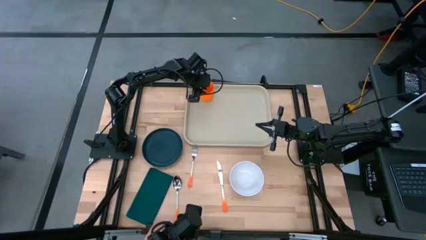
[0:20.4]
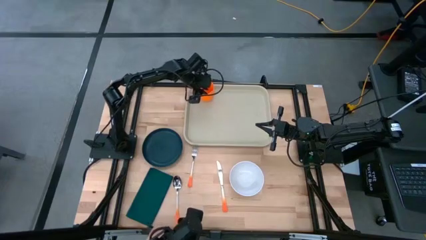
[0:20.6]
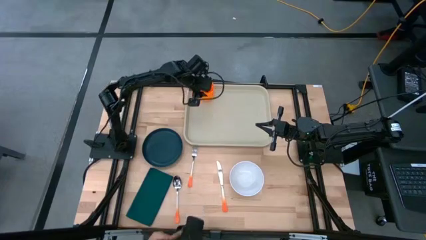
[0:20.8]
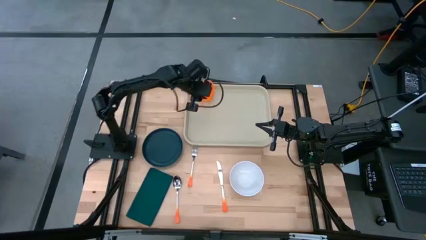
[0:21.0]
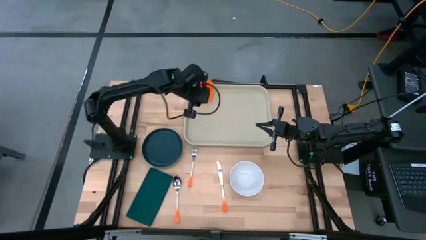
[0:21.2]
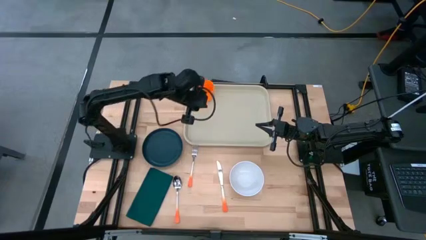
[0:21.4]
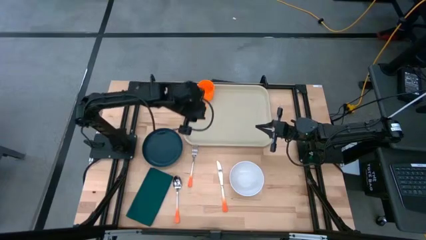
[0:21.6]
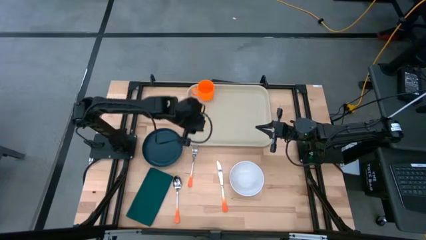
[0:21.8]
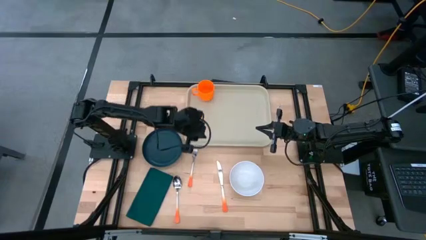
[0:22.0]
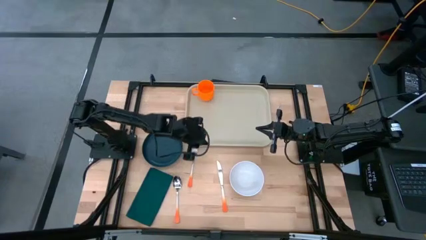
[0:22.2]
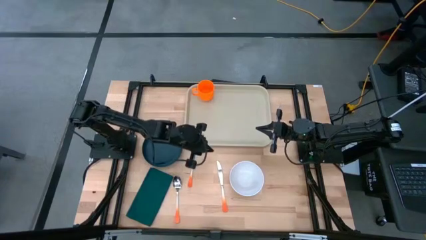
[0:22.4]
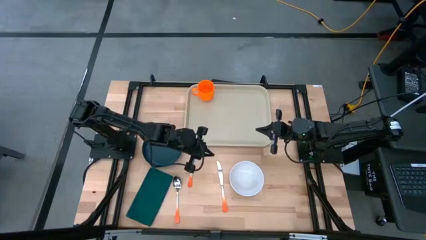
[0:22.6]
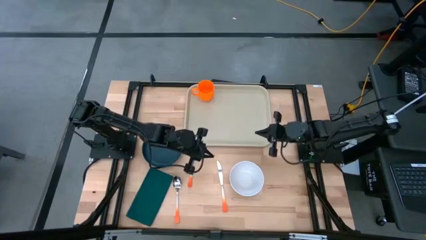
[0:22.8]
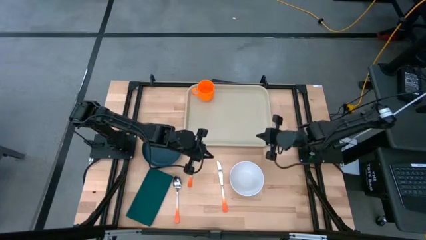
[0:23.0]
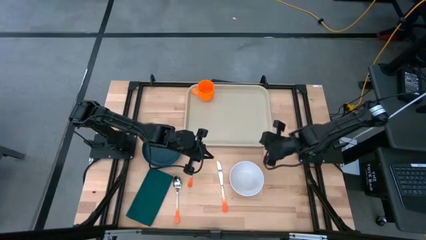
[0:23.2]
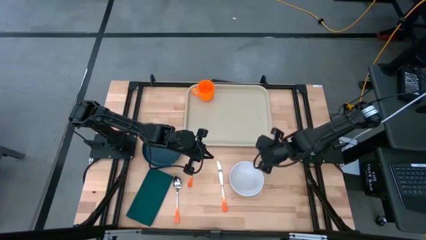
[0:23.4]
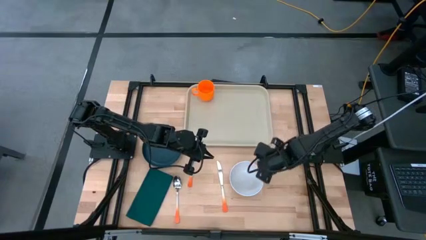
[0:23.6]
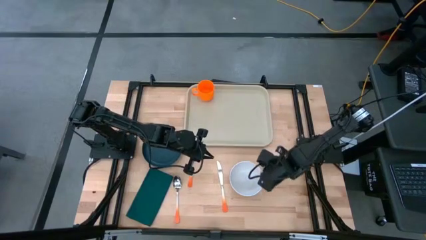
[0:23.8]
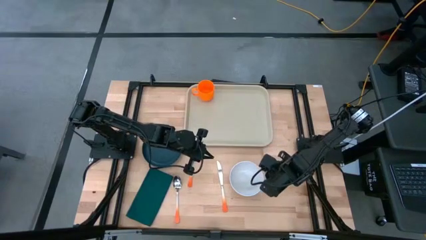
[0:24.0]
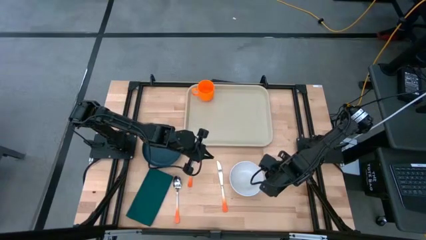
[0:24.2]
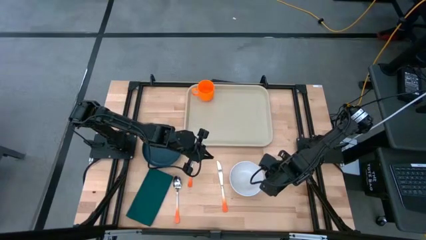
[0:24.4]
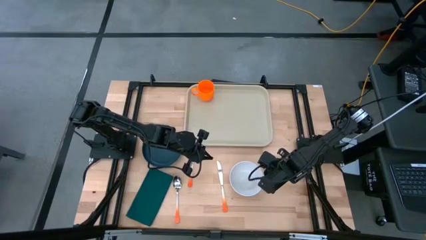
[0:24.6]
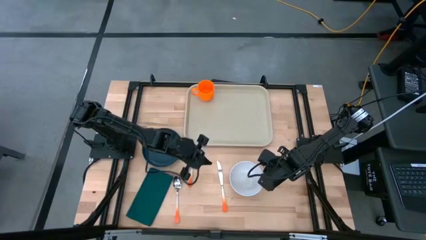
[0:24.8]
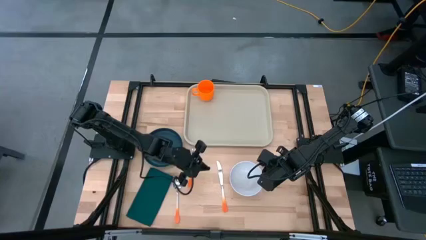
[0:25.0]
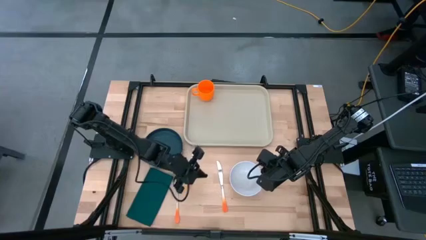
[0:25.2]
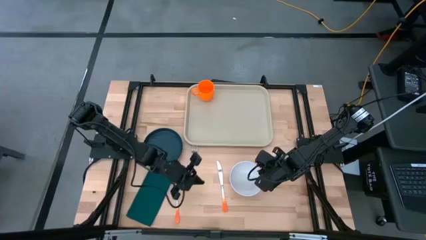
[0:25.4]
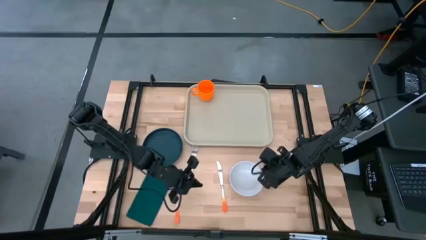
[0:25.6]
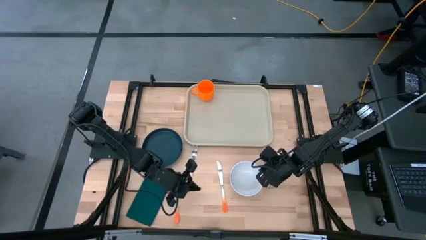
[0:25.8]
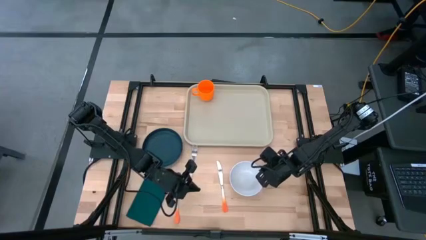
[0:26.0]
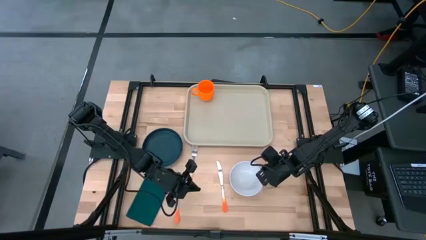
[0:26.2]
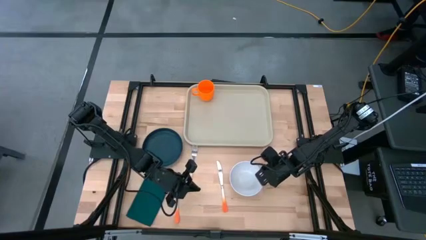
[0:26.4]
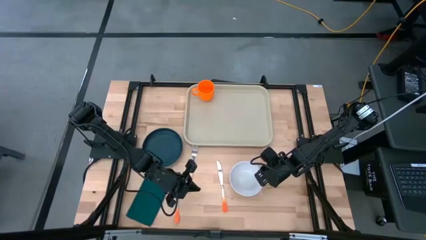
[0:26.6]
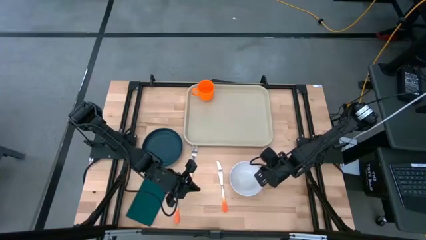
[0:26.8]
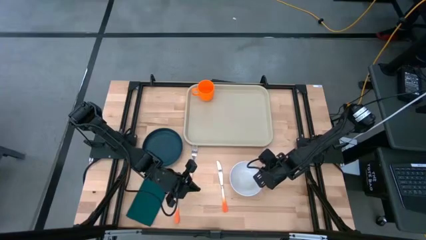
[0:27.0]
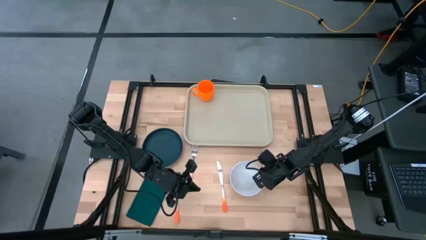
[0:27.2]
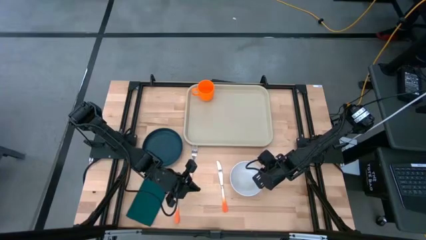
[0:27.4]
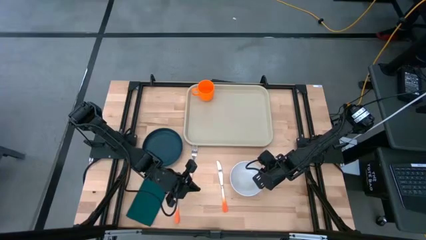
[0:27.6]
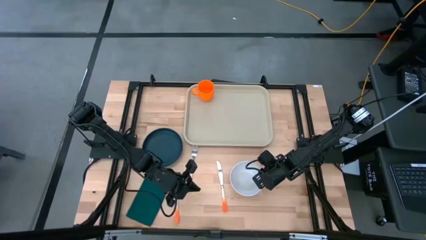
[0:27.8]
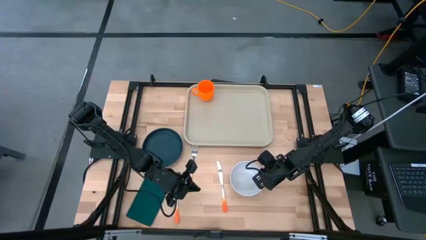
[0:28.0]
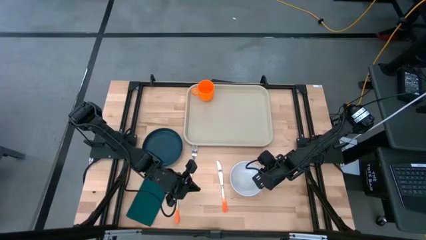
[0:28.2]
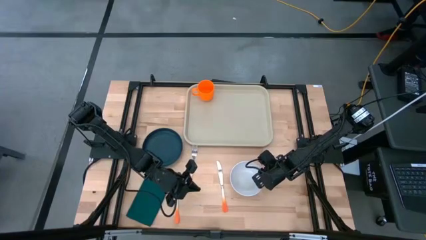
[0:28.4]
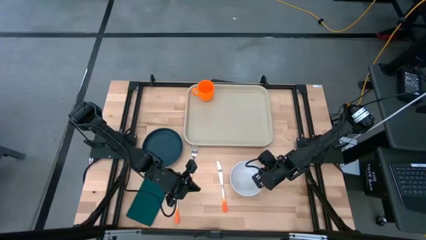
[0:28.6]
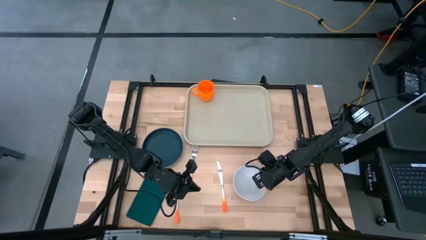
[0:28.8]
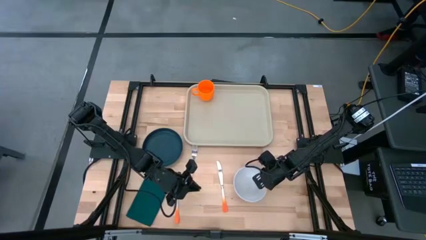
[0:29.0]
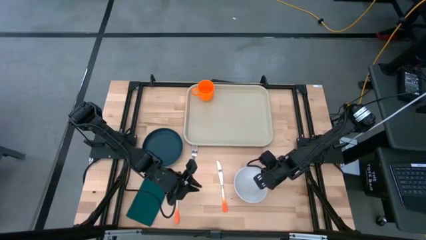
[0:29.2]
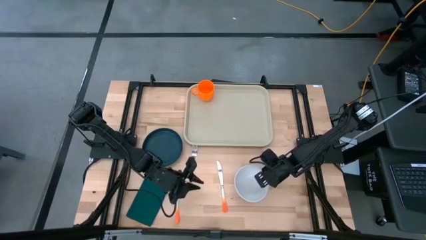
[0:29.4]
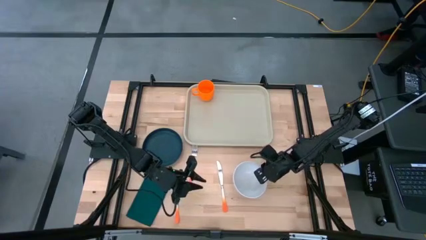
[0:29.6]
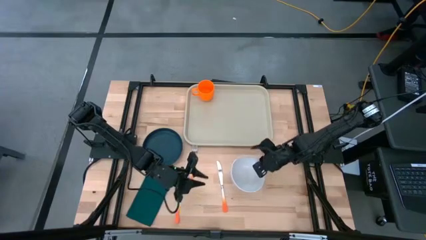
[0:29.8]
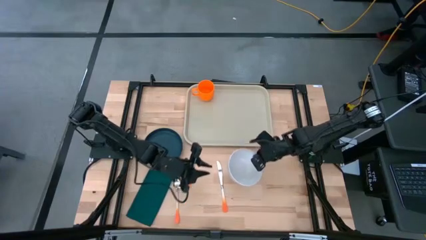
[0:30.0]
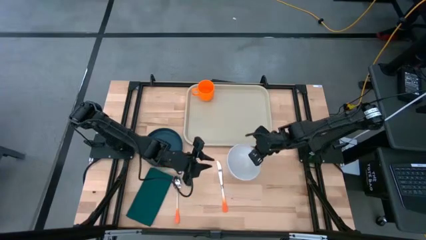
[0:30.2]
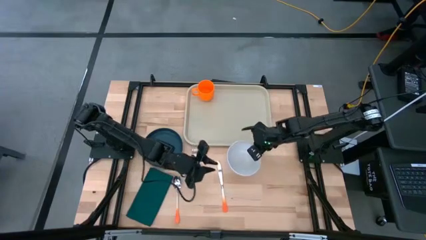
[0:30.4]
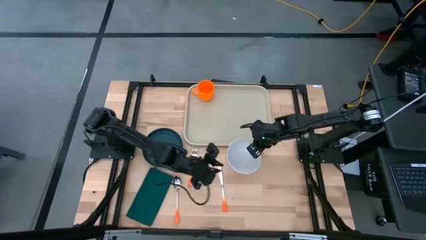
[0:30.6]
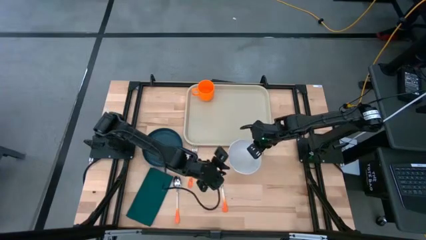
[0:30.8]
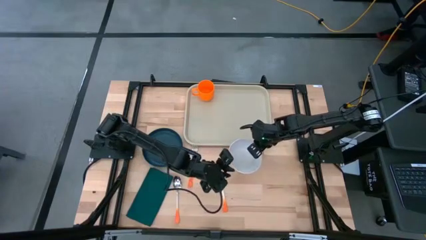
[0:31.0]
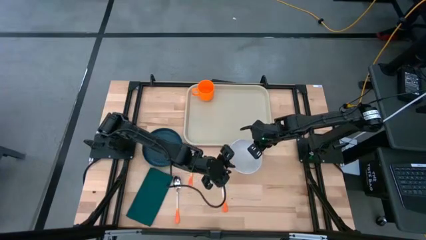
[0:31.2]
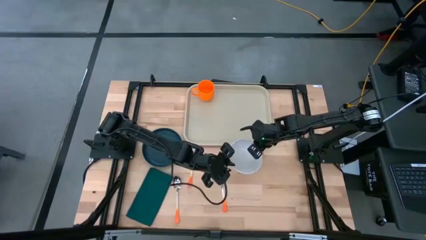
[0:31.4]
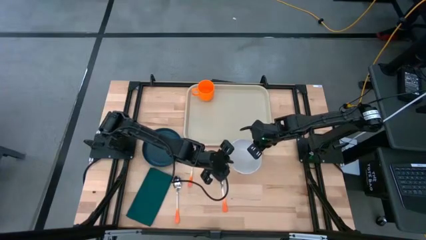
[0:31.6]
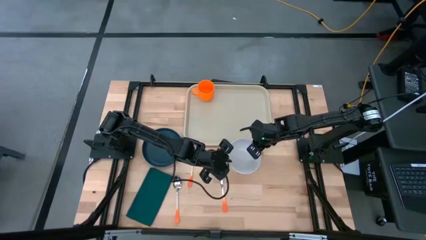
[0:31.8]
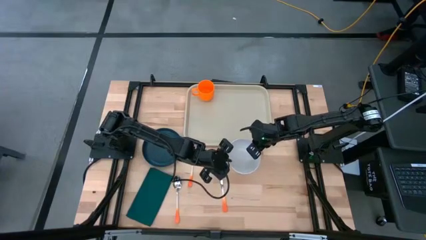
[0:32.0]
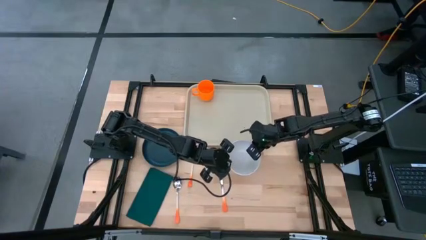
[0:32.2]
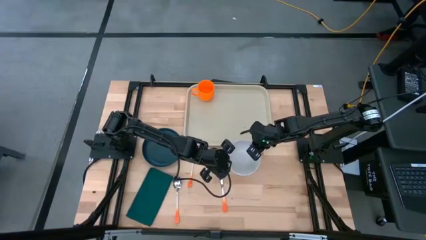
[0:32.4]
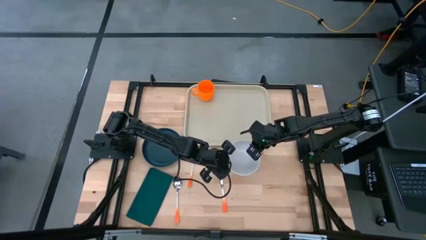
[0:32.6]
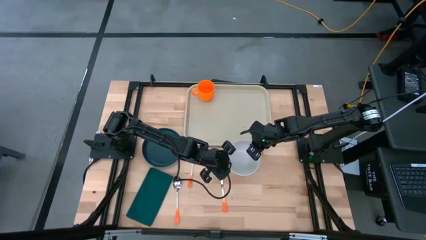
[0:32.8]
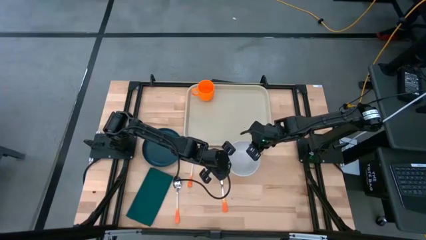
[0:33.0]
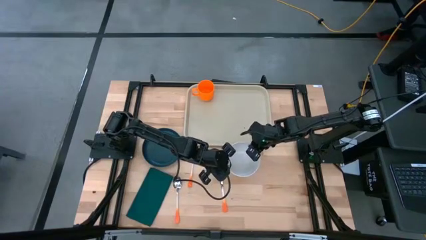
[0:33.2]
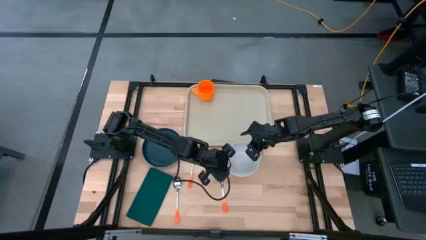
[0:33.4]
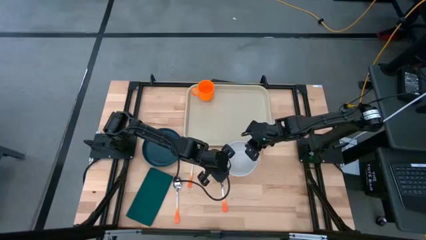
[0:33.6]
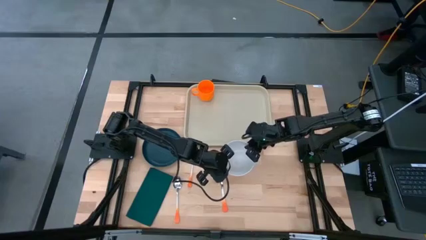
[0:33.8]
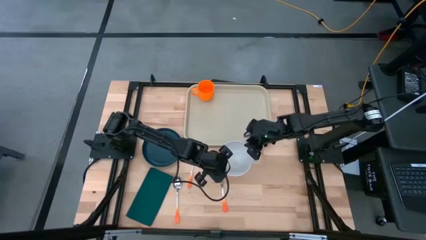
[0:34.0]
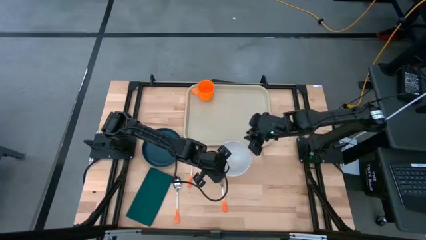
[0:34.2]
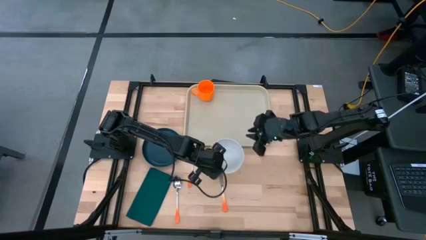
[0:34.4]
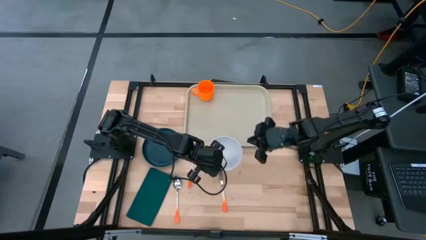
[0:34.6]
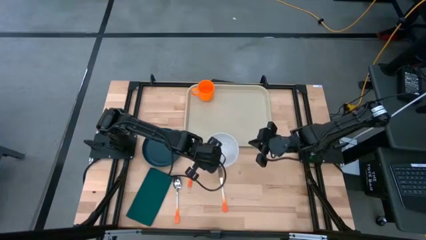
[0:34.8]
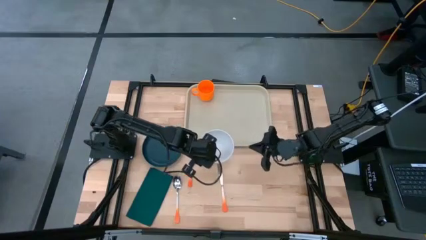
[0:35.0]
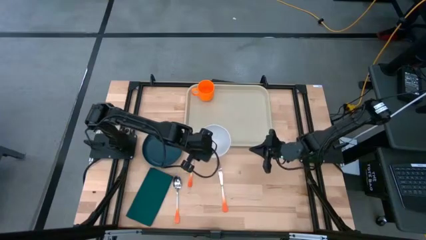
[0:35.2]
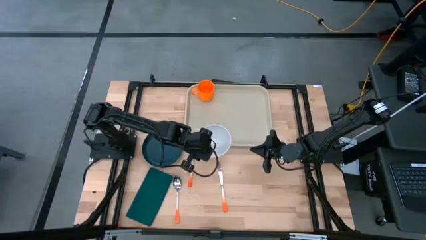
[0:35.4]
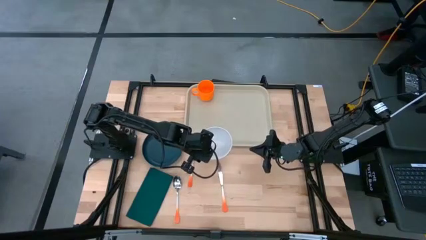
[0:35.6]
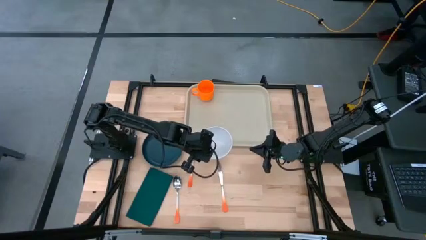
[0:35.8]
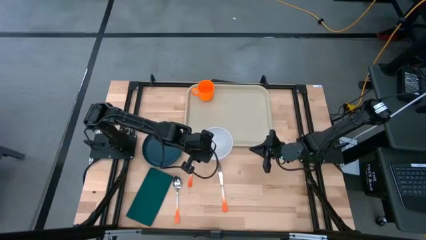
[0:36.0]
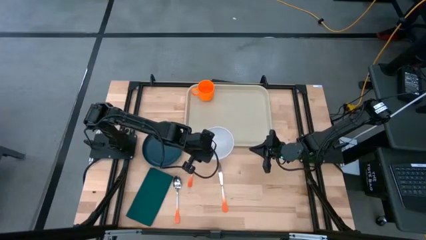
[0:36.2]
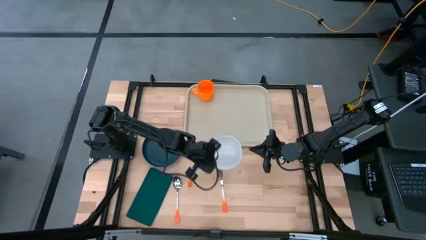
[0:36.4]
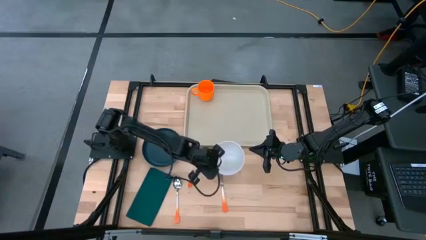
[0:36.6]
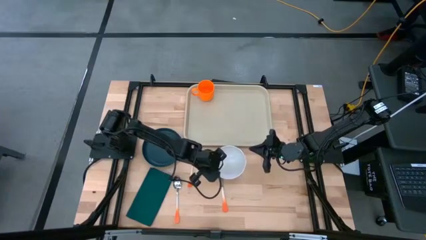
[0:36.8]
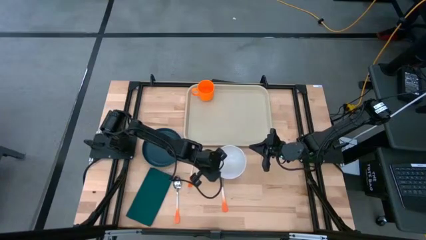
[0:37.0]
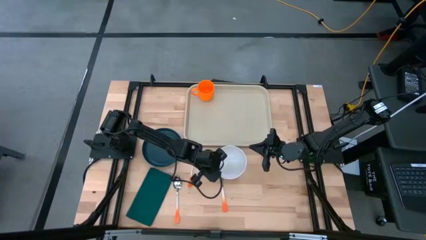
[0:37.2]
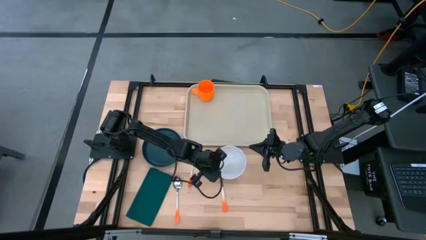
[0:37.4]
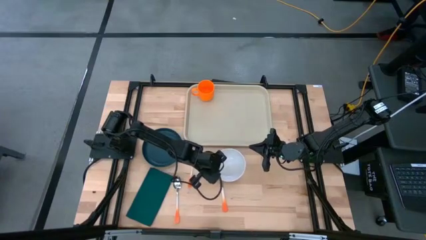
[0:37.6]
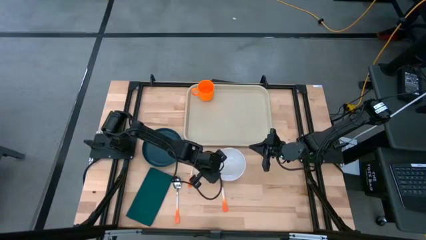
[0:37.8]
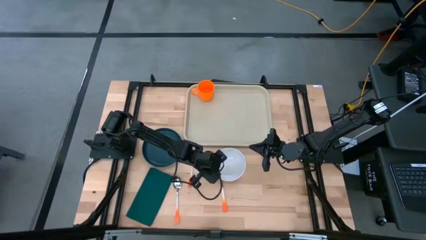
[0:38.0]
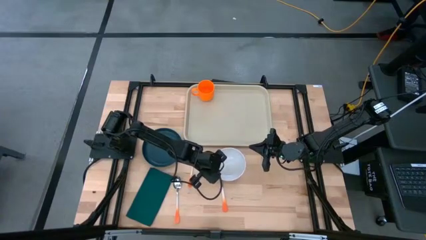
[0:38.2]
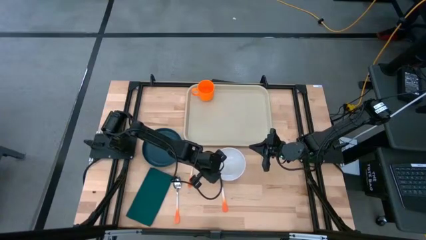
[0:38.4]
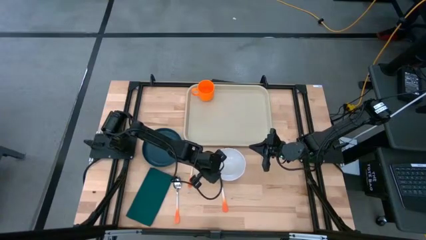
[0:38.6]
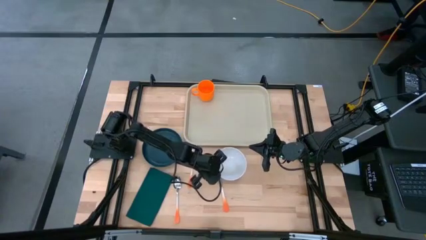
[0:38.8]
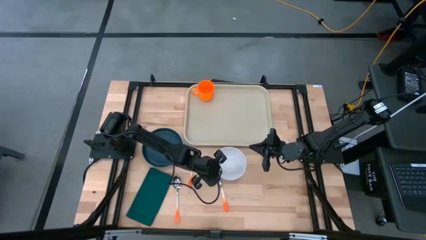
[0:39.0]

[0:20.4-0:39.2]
Task: Set up tray
Move the white bowl near the gray serving tray
